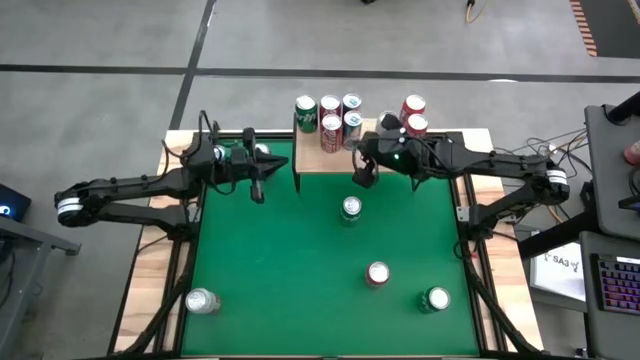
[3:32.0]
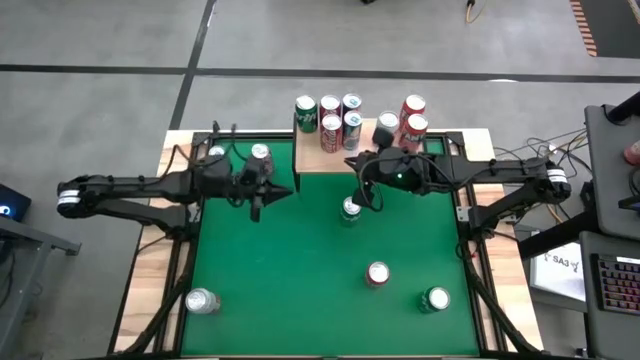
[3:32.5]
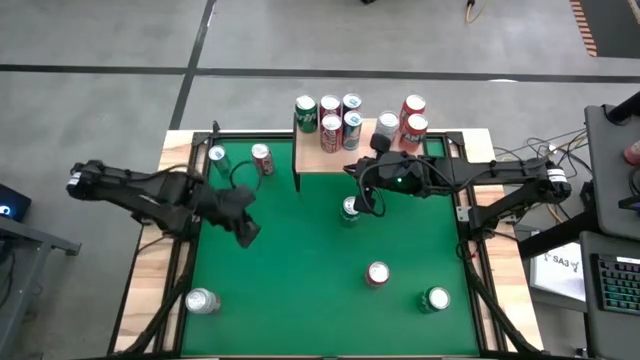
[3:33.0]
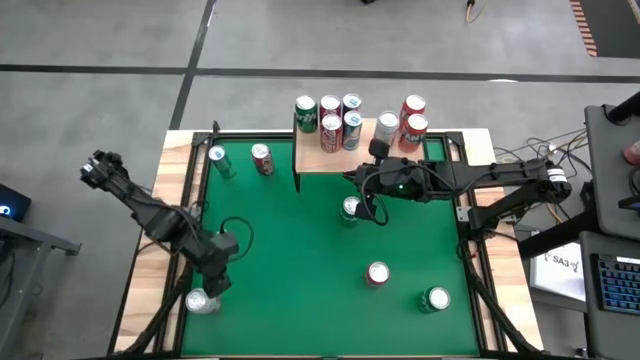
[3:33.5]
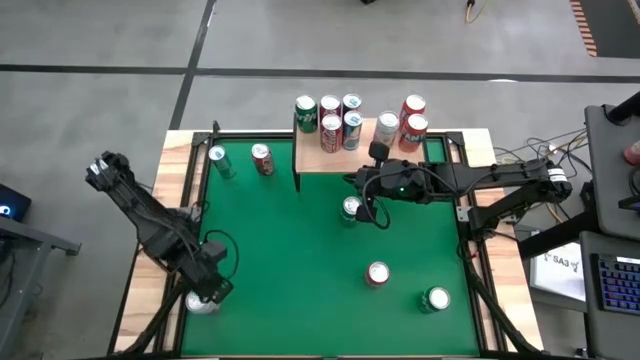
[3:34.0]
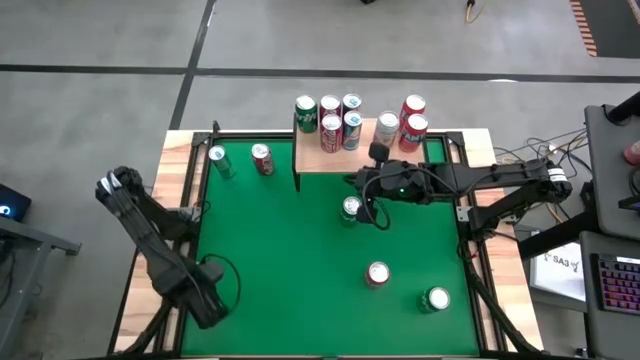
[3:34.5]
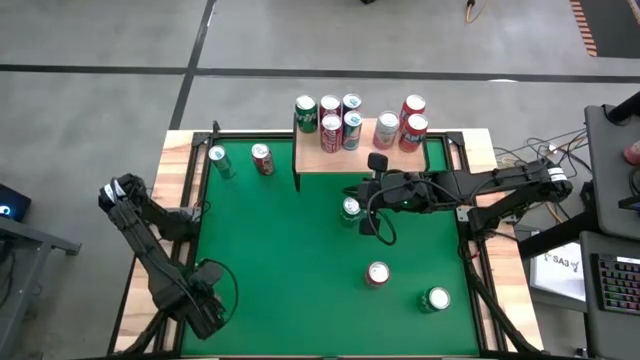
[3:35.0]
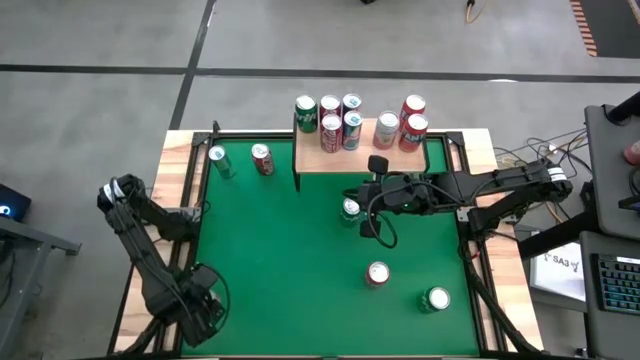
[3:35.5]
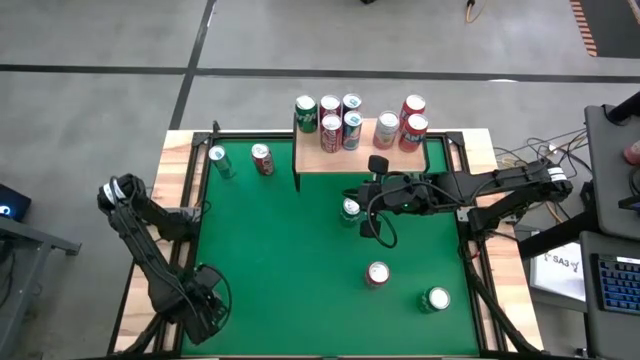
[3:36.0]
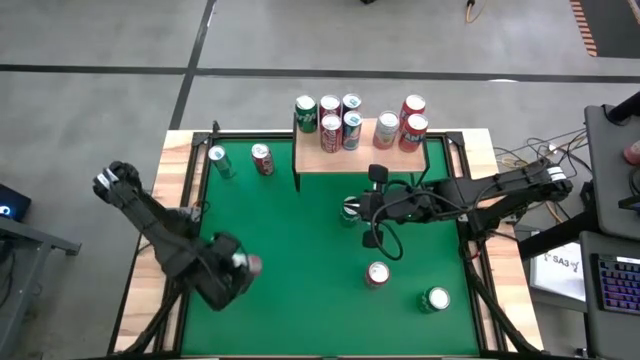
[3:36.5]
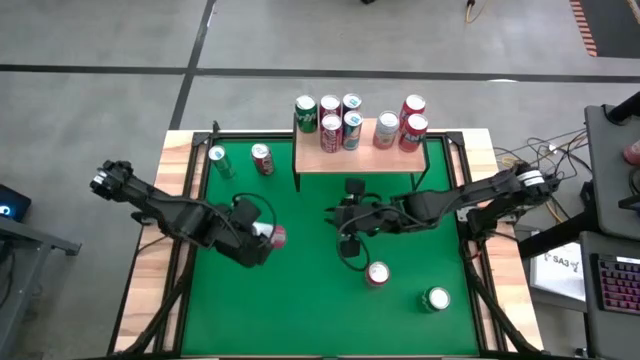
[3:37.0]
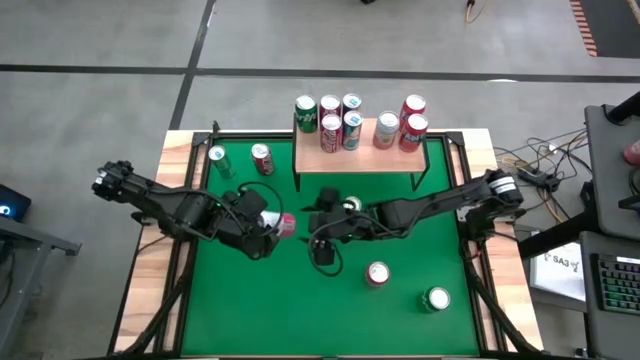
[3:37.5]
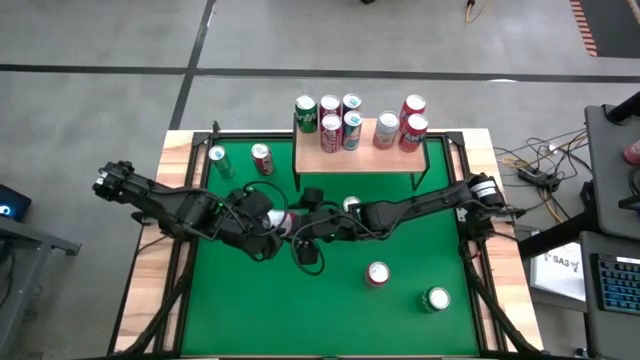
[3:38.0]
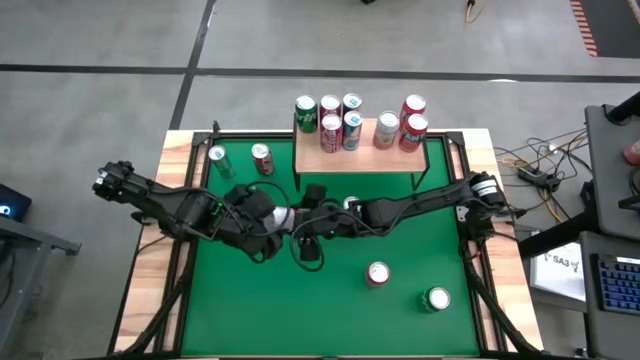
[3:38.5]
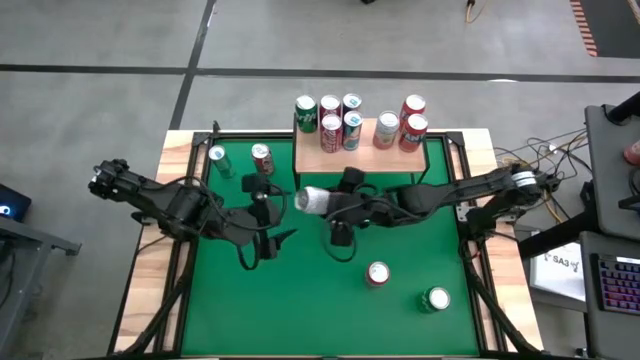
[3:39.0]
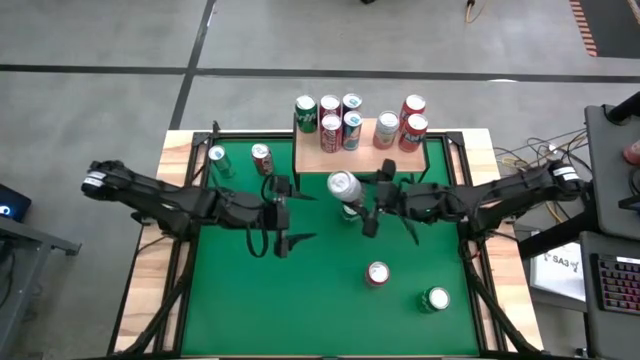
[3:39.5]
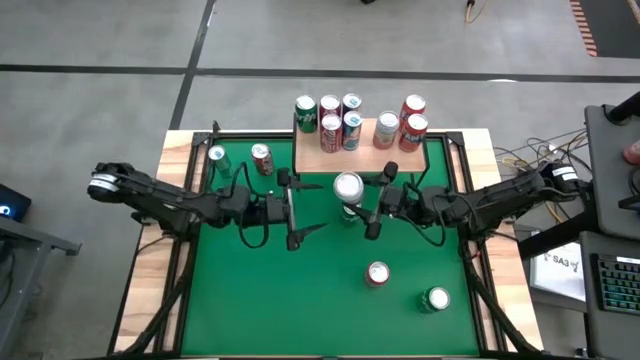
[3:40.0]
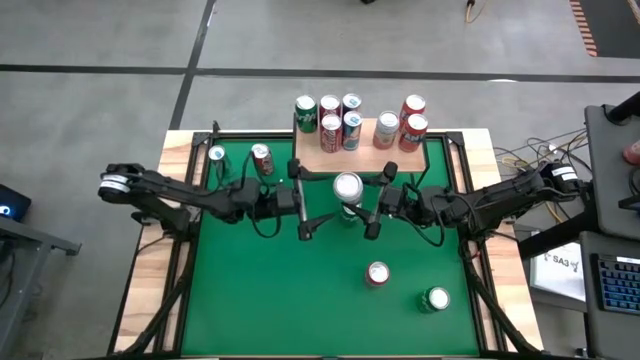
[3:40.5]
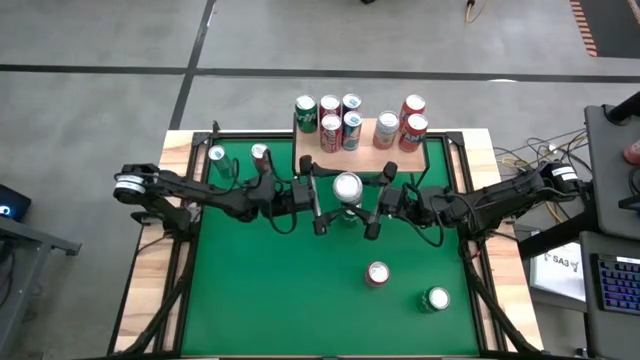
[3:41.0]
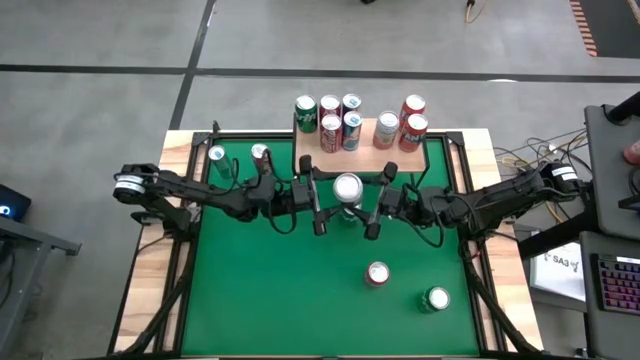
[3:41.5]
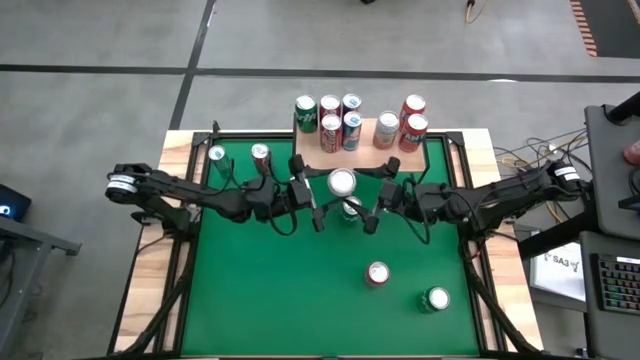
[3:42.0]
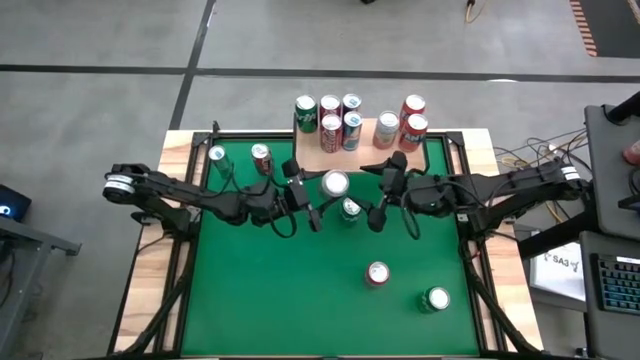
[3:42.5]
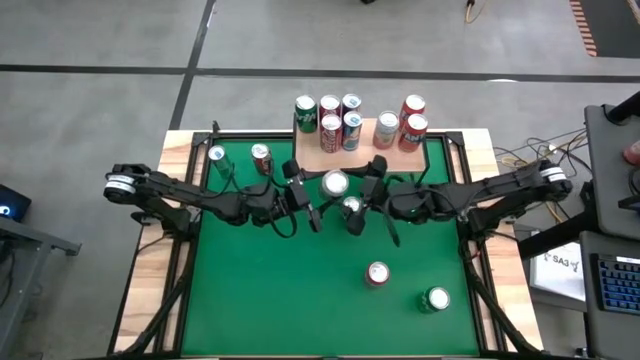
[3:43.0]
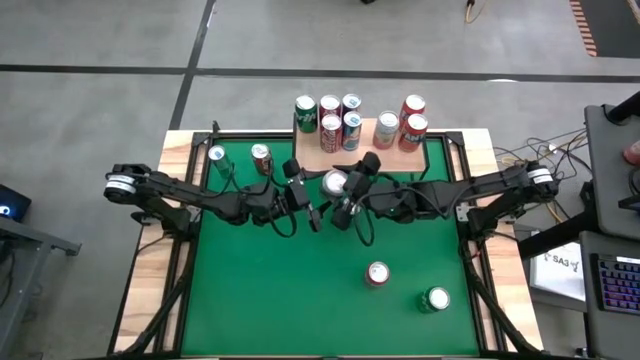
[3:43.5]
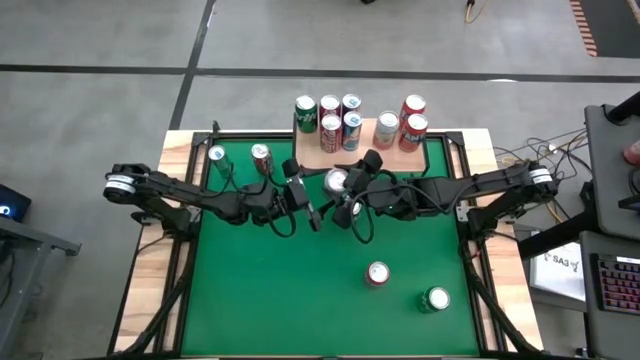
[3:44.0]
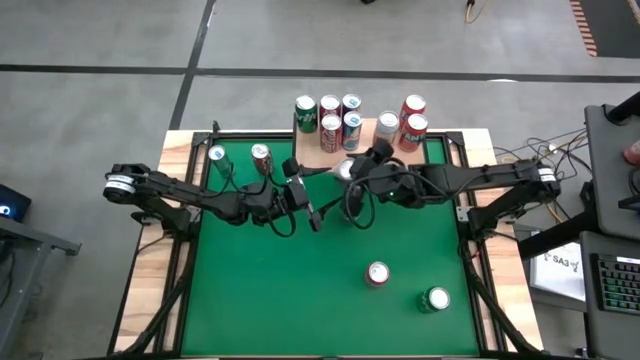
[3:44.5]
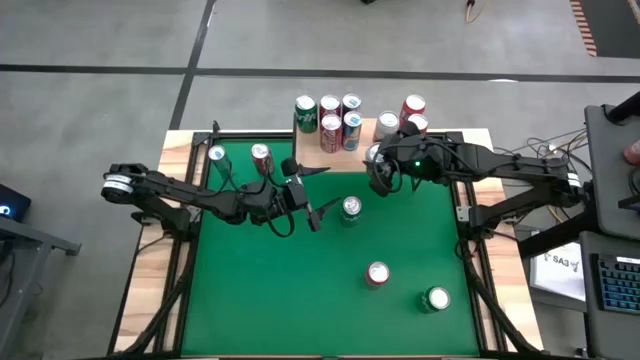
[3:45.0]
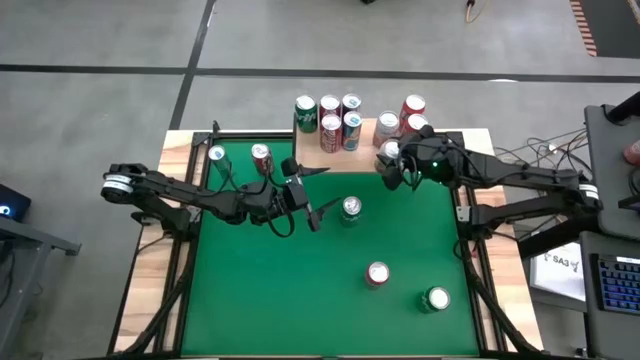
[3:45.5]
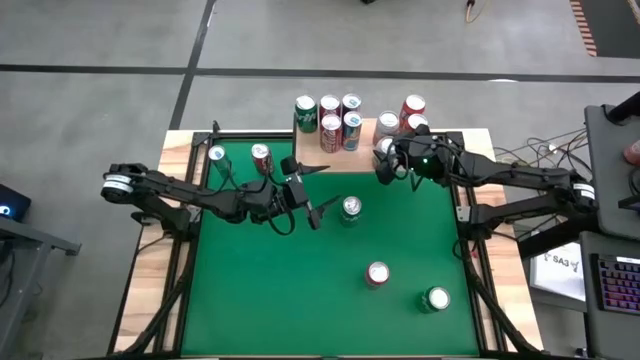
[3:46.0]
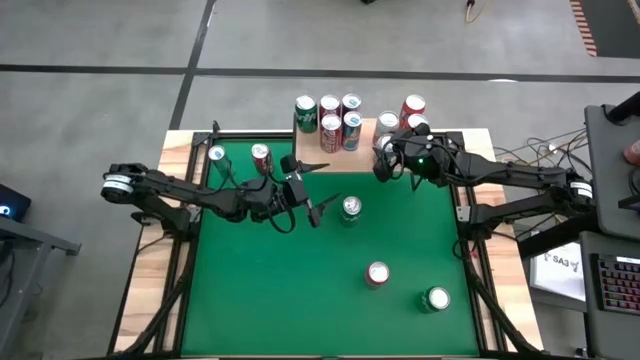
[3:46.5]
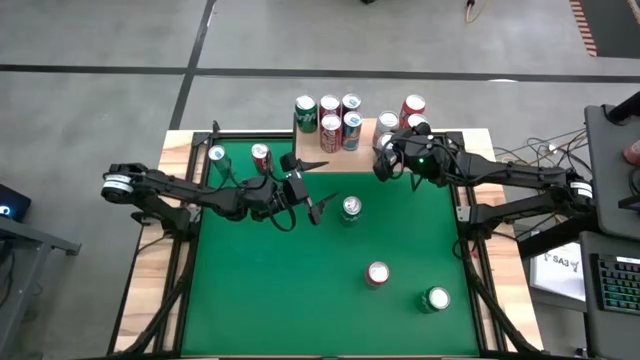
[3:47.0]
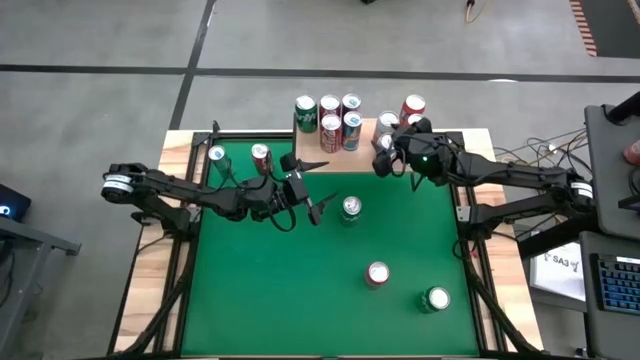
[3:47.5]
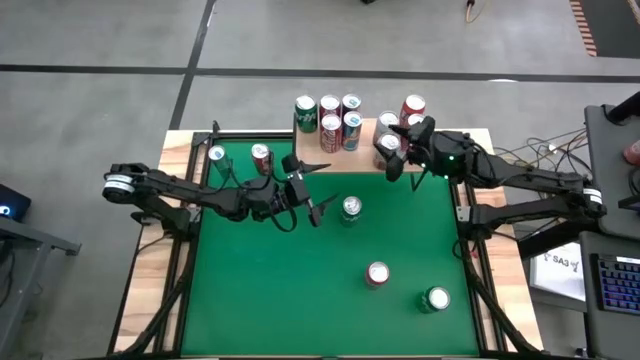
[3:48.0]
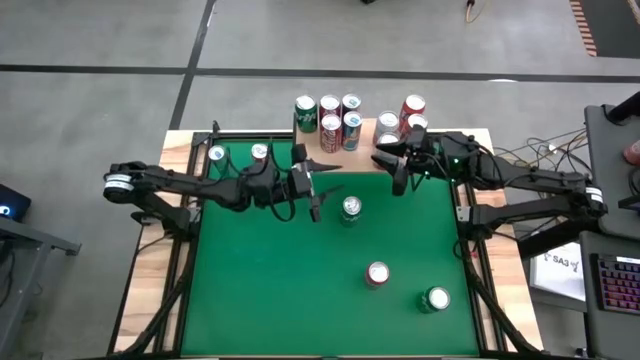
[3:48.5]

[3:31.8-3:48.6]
Task: Place canned beverage on shelf
Put the pink white soda can aligned with the red white soda can on the shelf

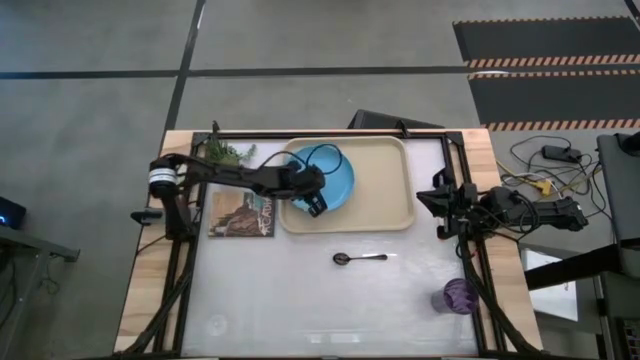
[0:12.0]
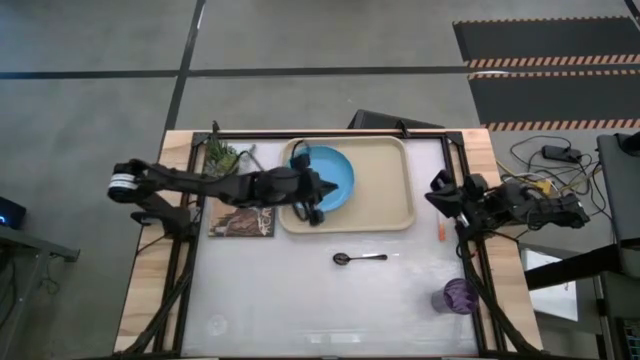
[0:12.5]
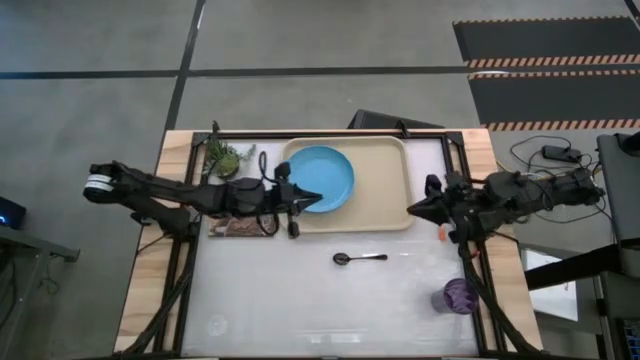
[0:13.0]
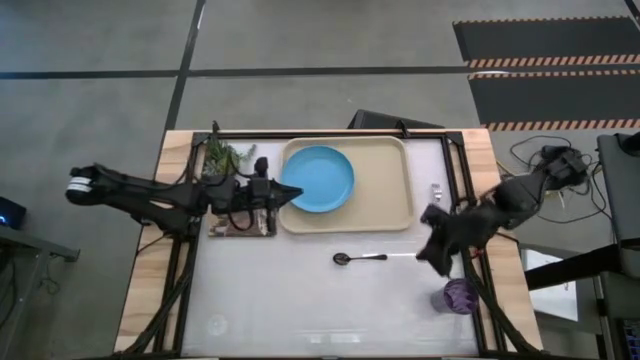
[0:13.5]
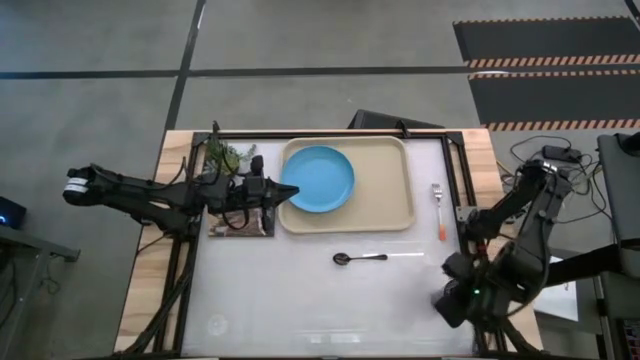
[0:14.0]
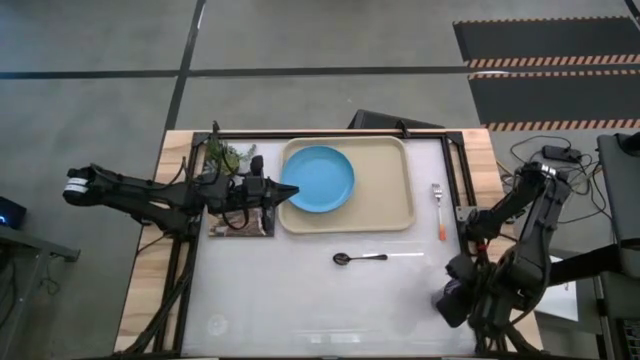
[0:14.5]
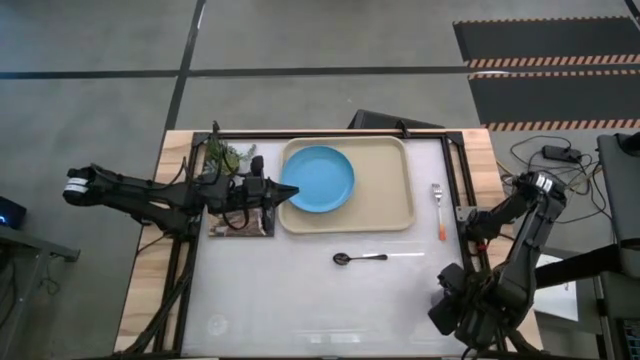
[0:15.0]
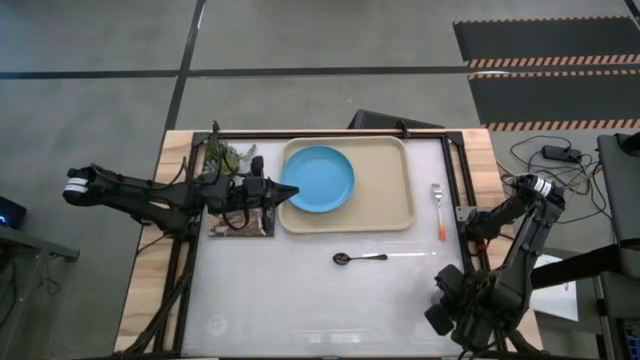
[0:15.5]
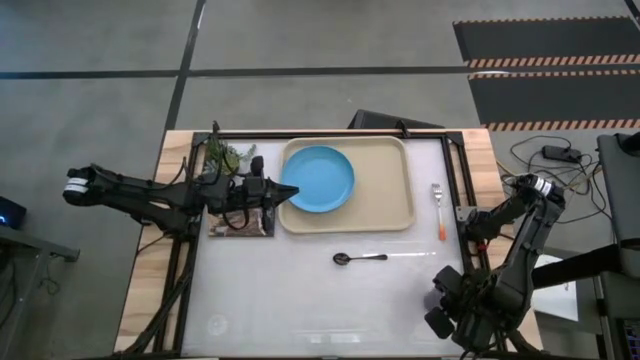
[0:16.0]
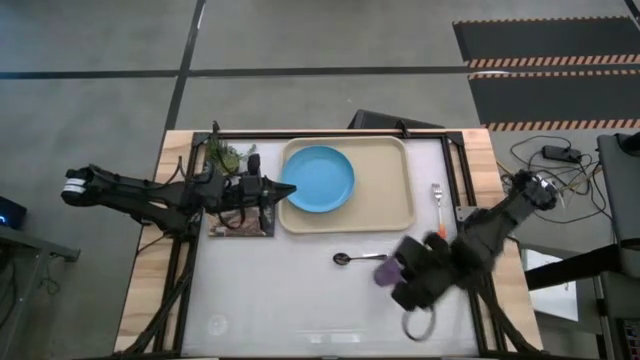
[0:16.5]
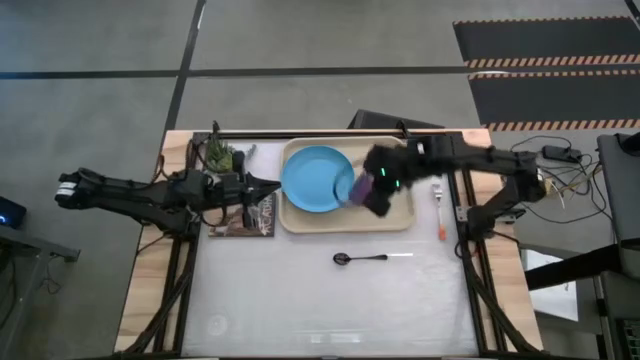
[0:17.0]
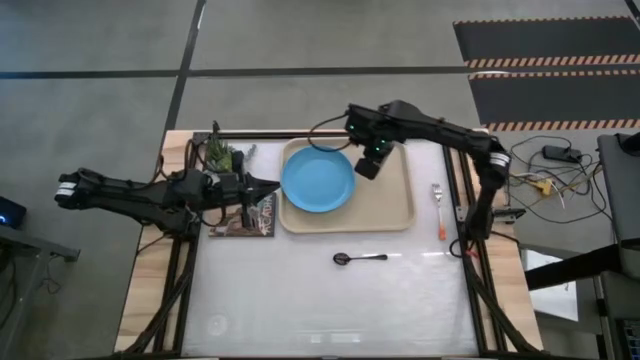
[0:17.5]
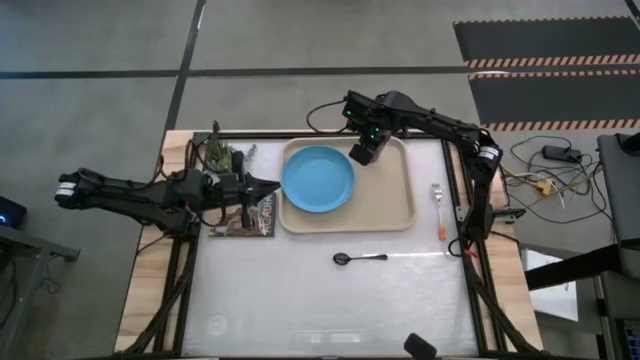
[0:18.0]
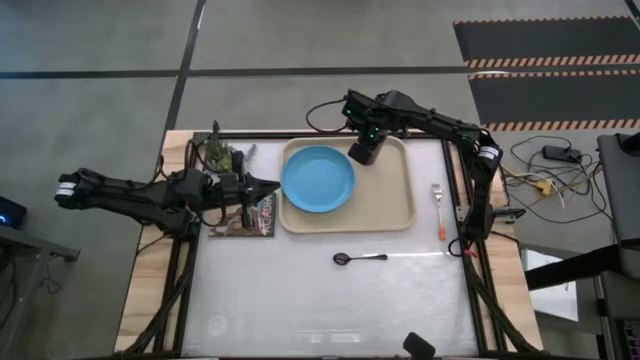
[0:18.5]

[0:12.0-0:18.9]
Task: Pick and place plate/cup/fork/spoon on tray
Put the violet cup on the top right of the white tray
